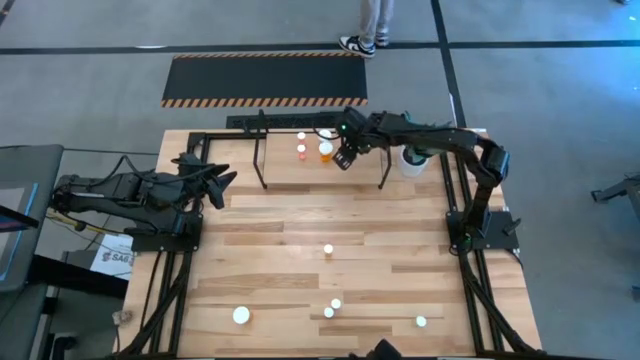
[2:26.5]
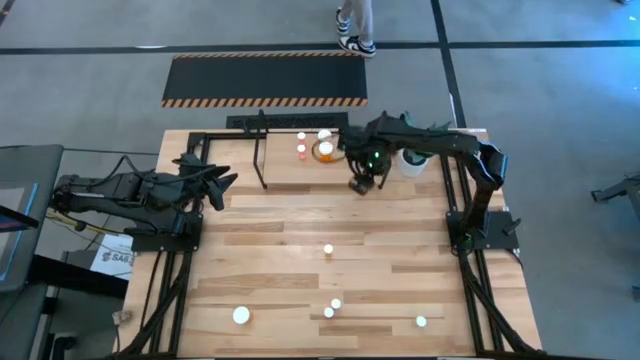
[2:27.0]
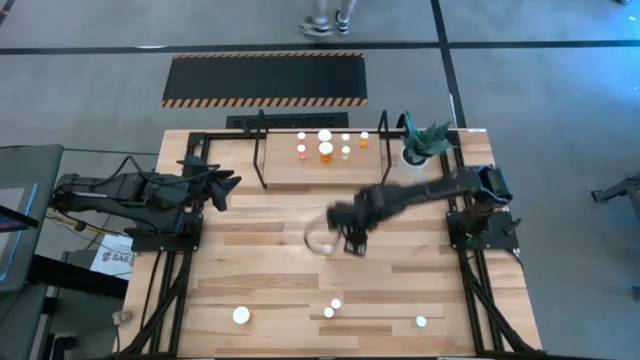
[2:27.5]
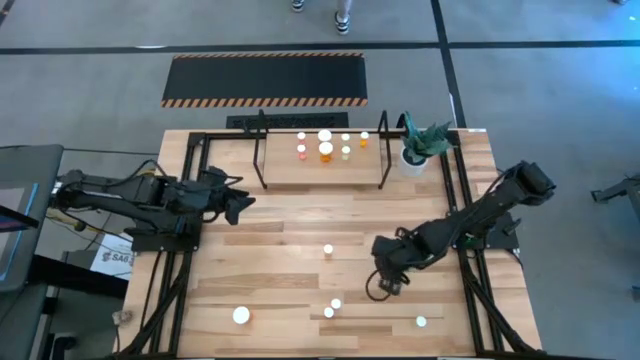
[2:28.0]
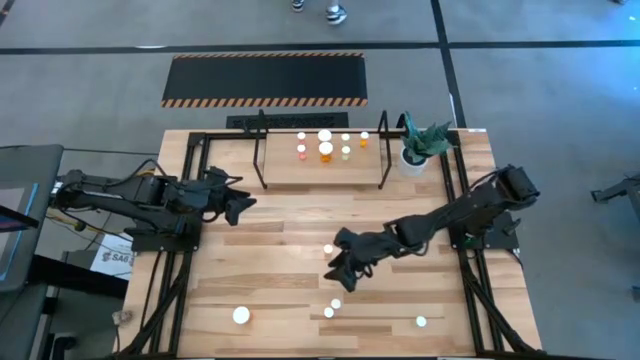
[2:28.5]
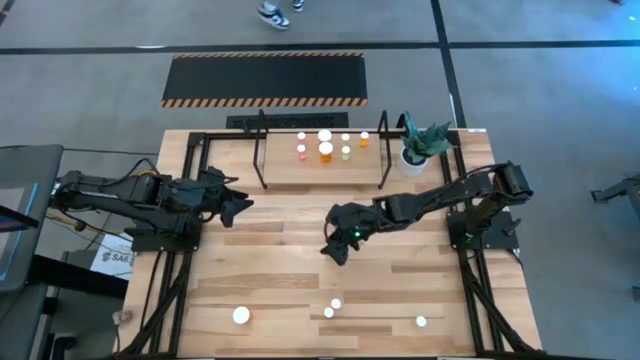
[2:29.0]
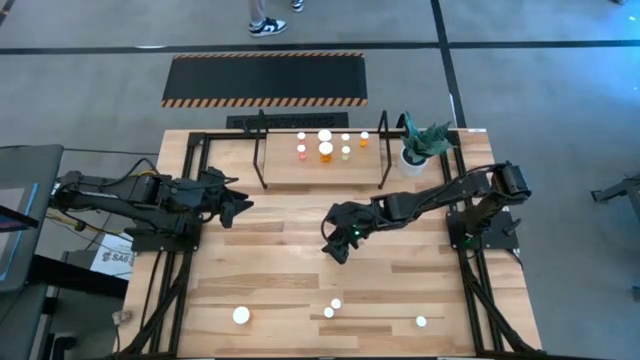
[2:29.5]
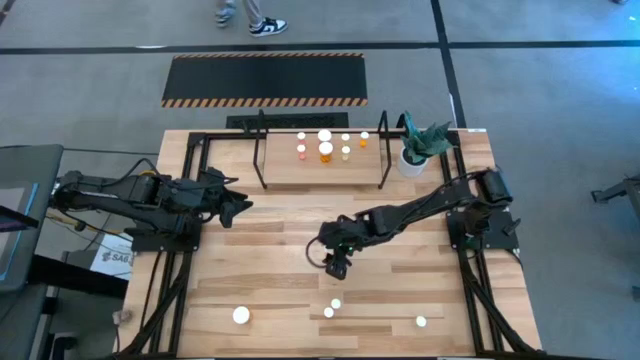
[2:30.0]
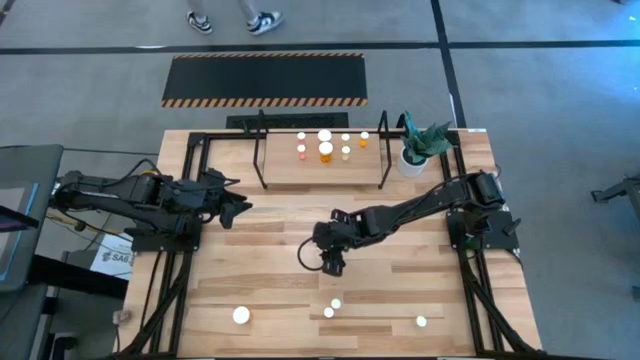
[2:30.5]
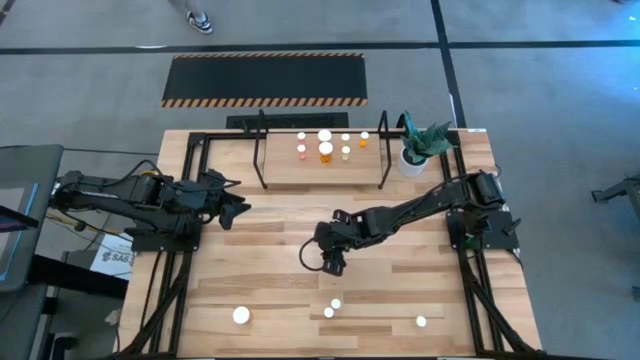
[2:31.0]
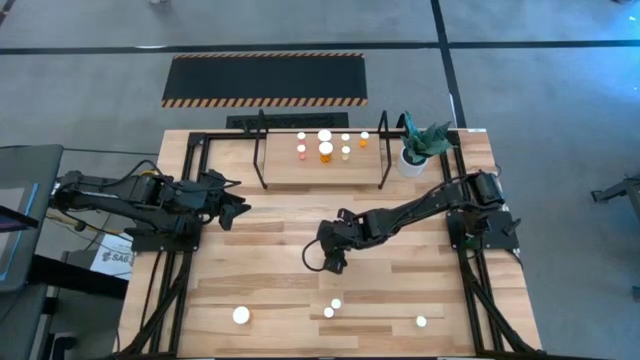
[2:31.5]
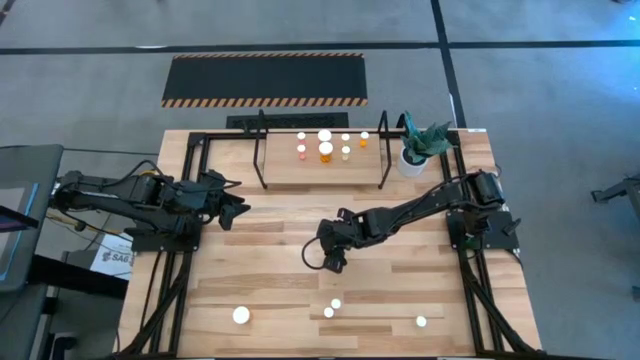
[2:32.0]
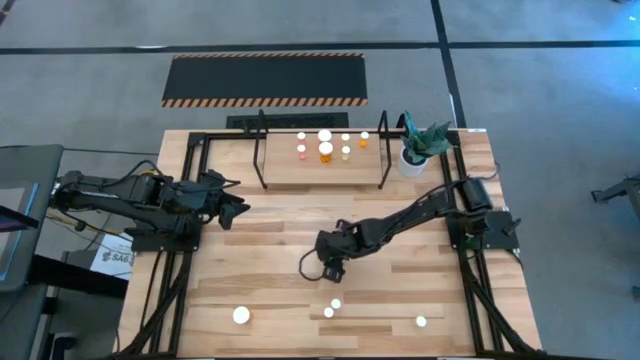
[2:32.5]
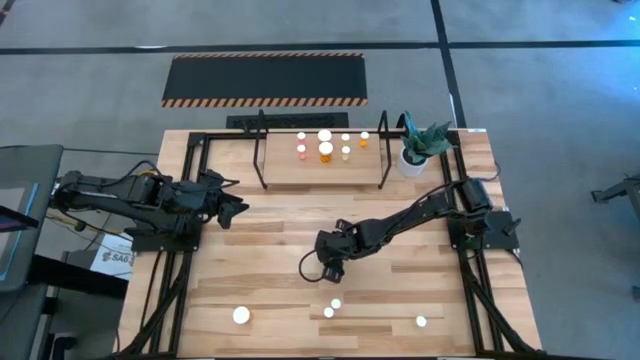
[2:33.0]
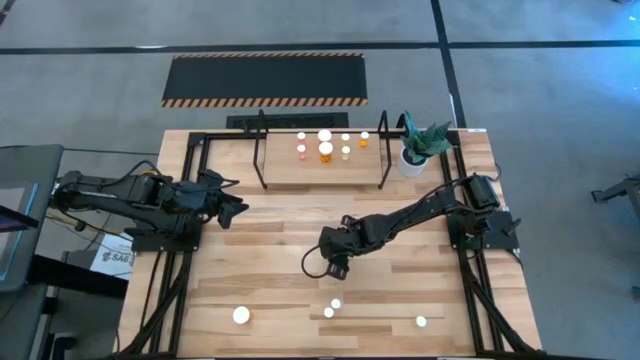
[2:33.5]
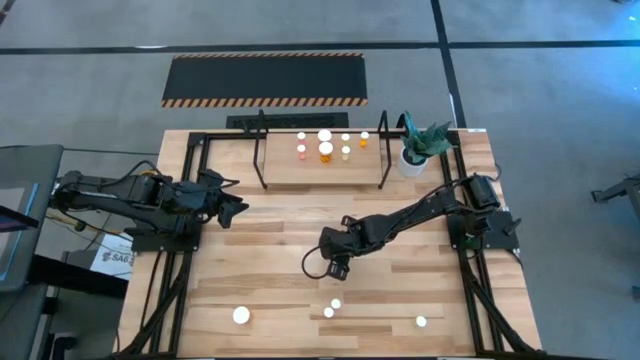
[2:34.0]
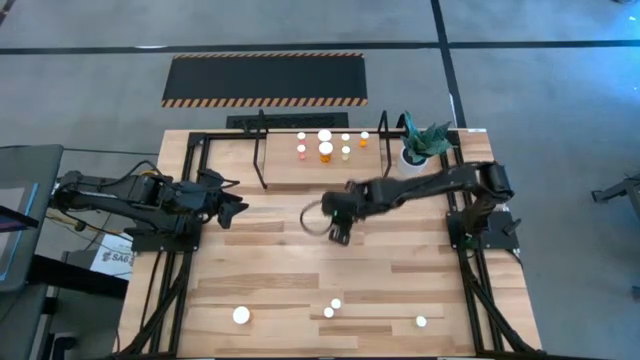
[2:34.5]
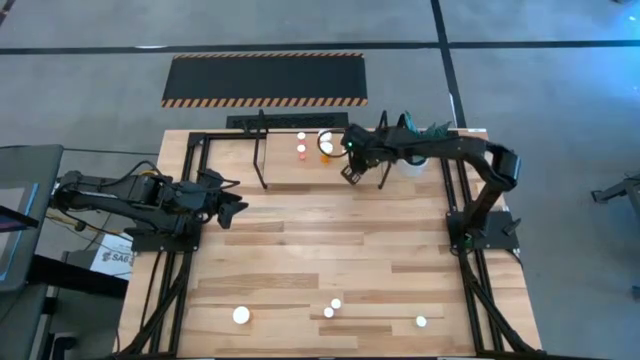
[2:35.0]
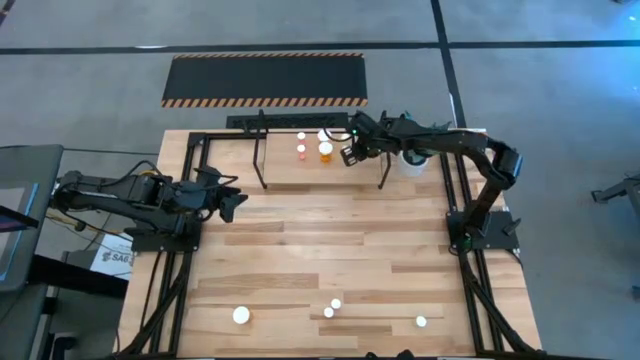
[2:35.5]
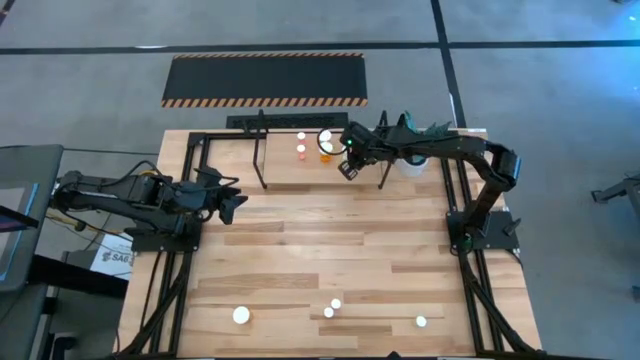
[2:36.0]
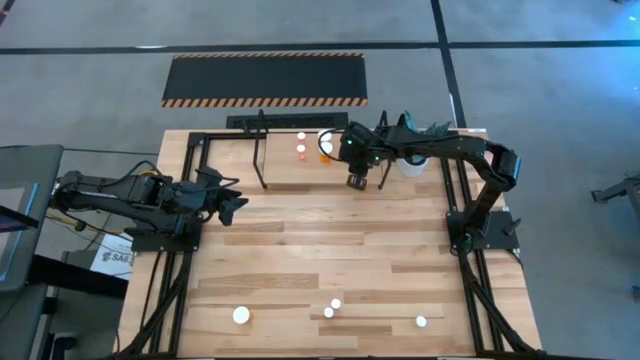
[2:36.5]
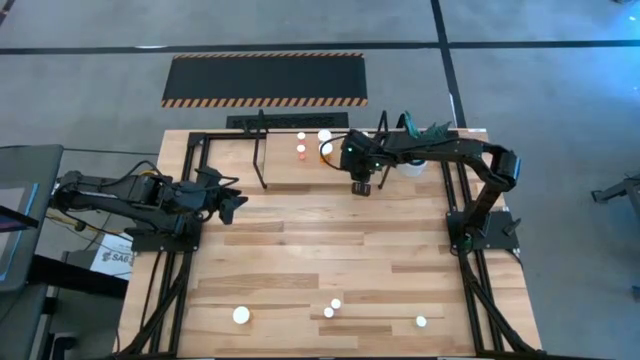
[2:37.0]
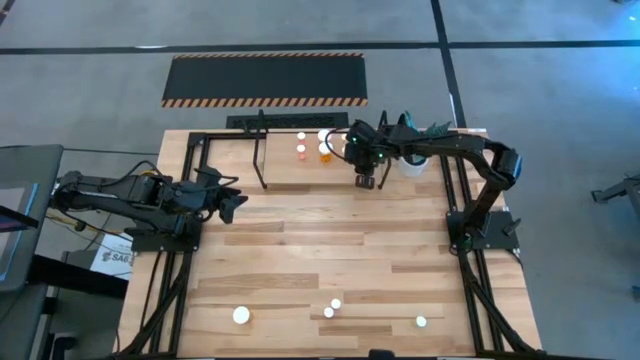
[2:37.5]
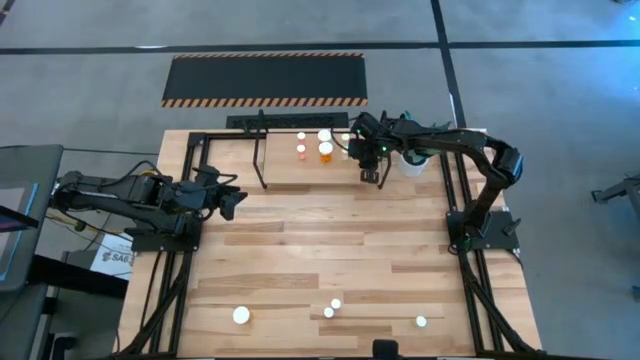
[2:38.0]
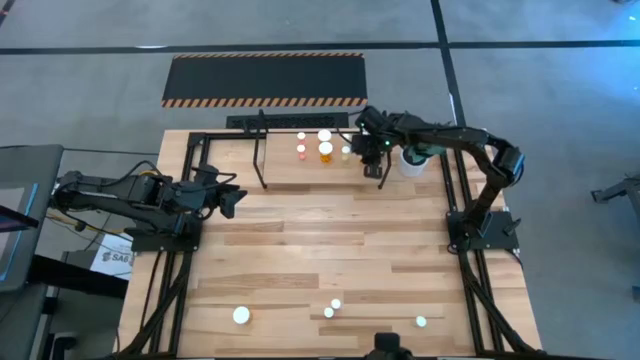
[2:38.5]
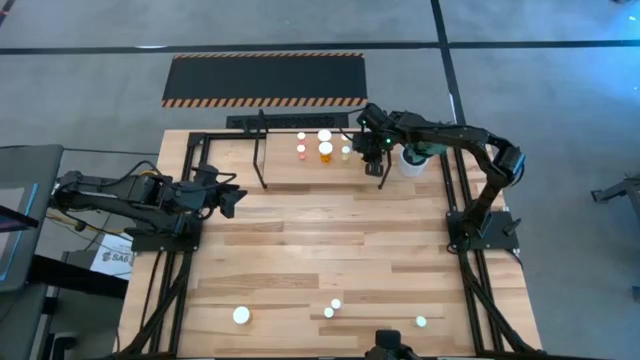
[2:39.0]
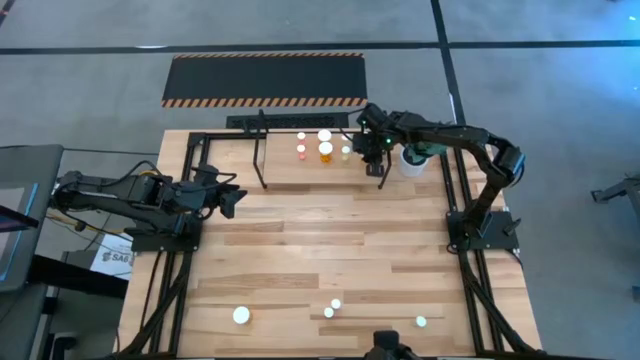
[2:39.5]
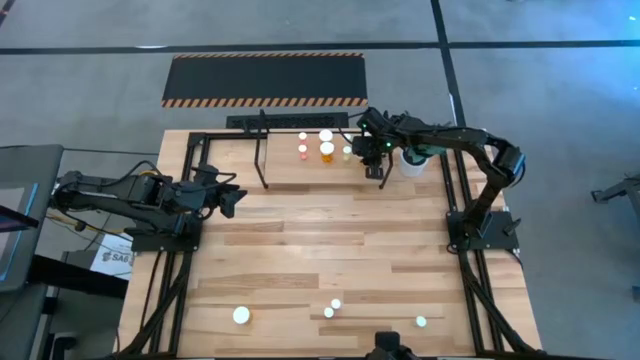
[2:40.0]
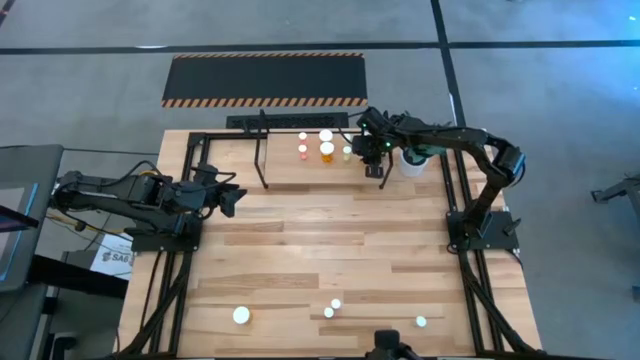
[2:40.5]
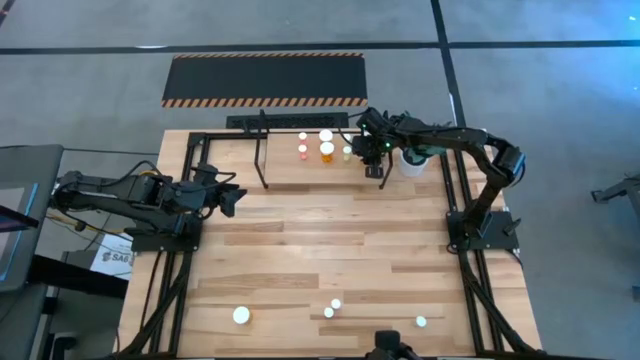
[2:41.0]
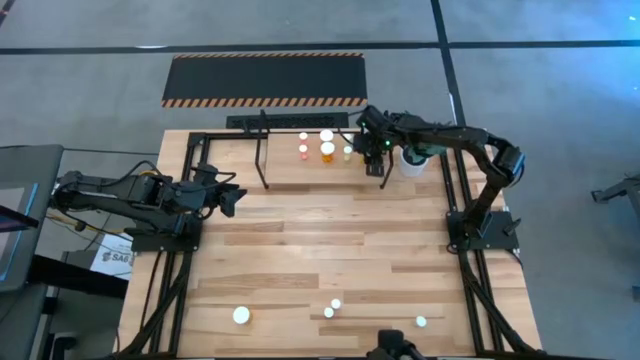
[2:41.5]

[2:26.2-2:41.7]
Task: Pick and place medicine bottles onto shelf by color
Put the top small orange pill bottle on the shelf aligned with the other small orange pill bottle

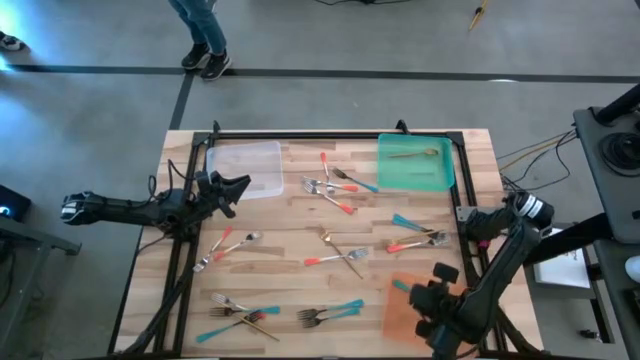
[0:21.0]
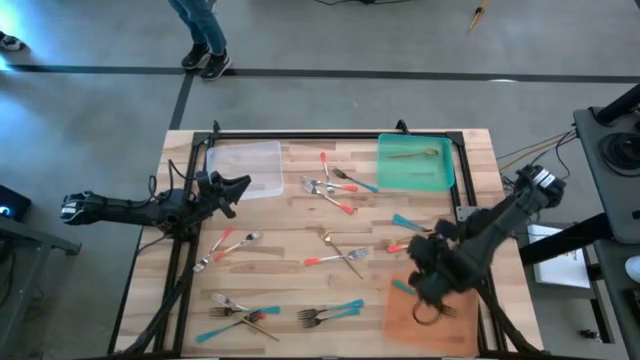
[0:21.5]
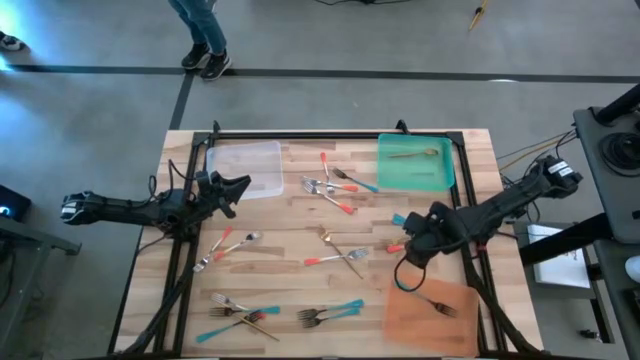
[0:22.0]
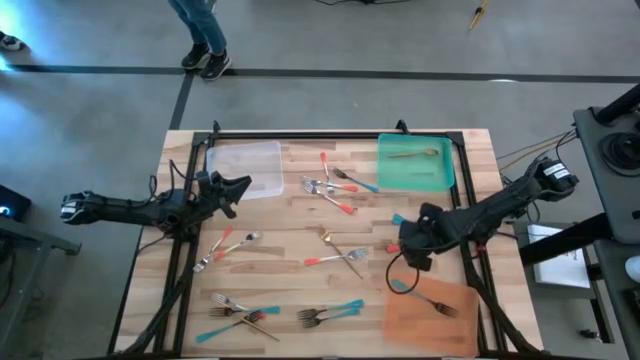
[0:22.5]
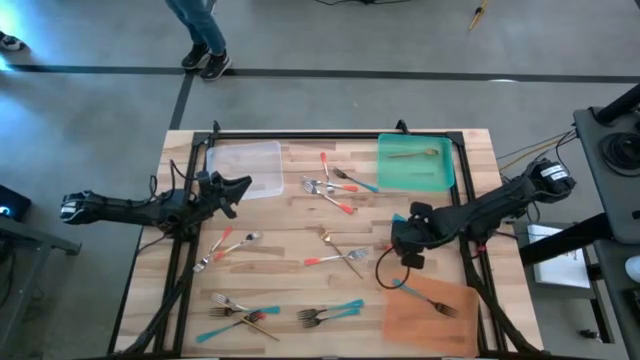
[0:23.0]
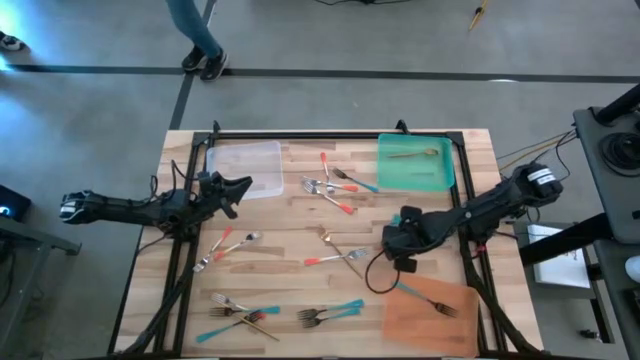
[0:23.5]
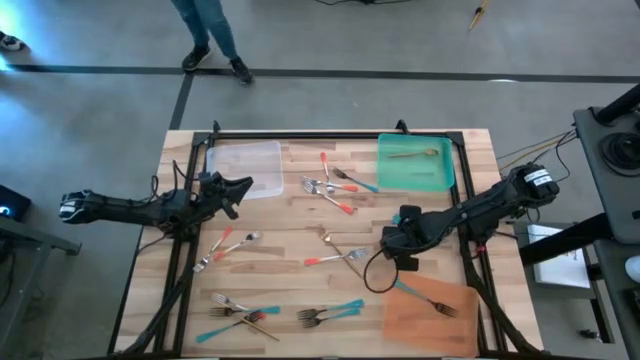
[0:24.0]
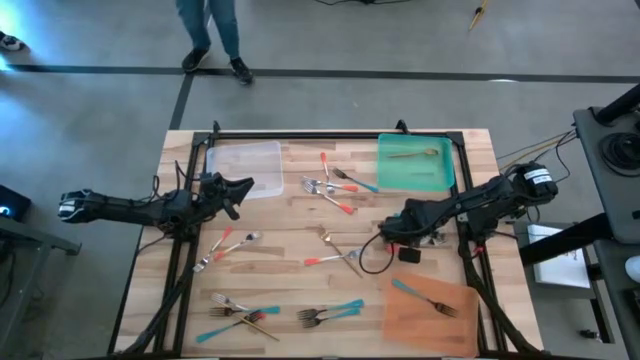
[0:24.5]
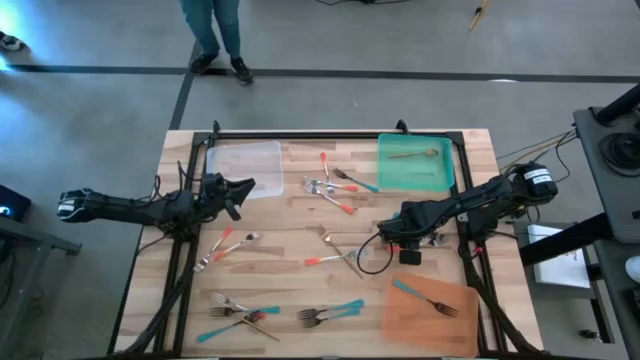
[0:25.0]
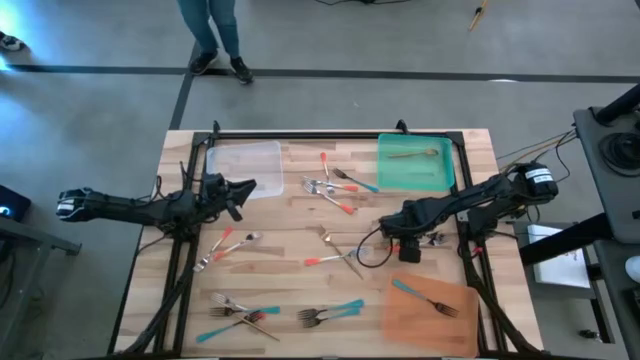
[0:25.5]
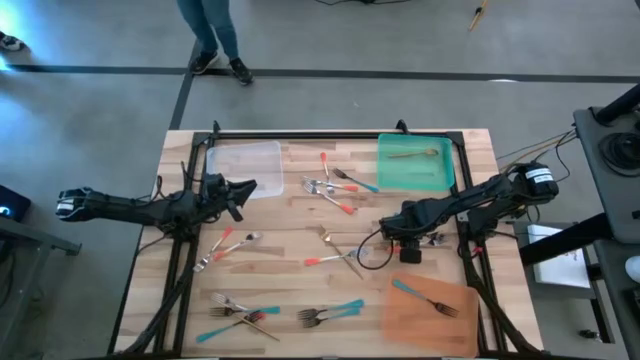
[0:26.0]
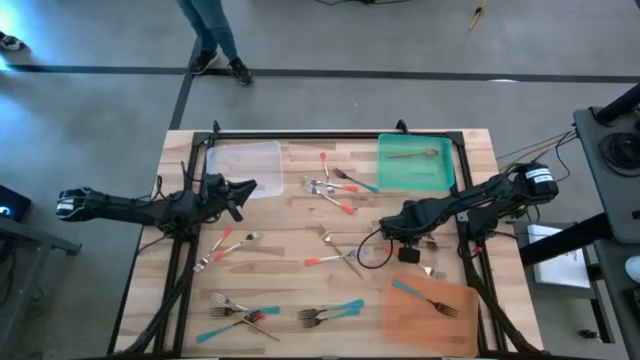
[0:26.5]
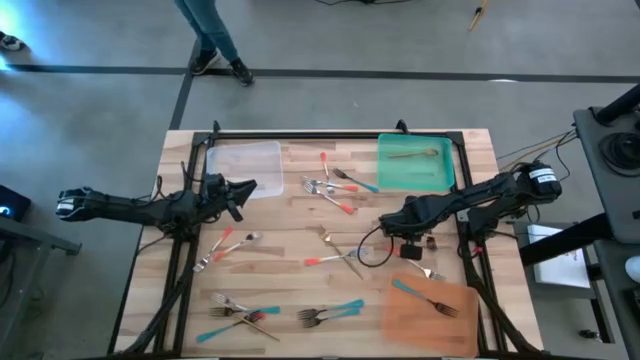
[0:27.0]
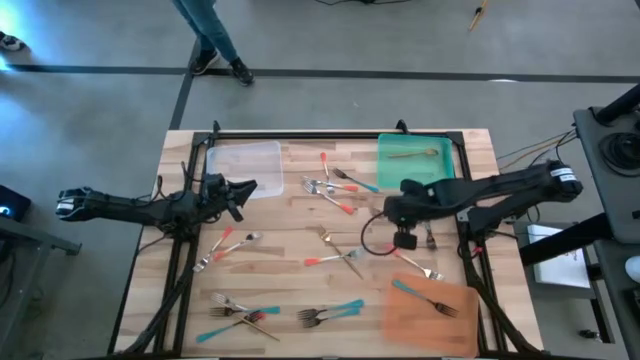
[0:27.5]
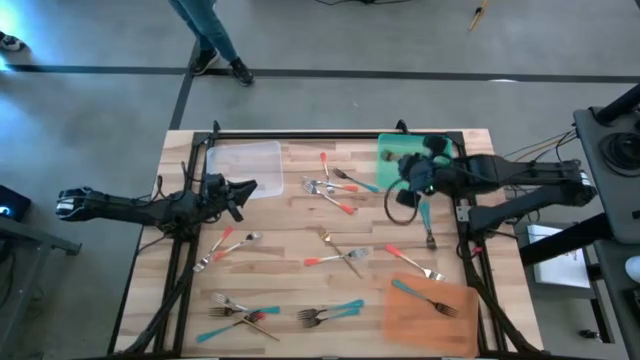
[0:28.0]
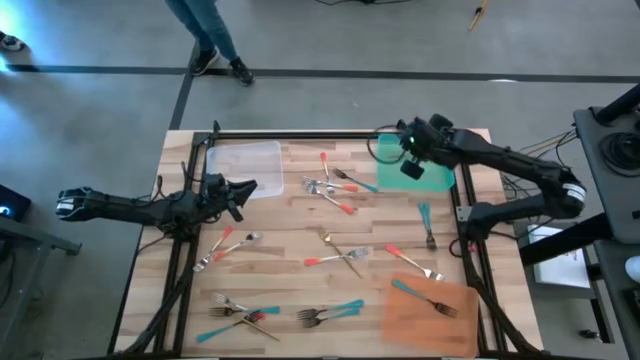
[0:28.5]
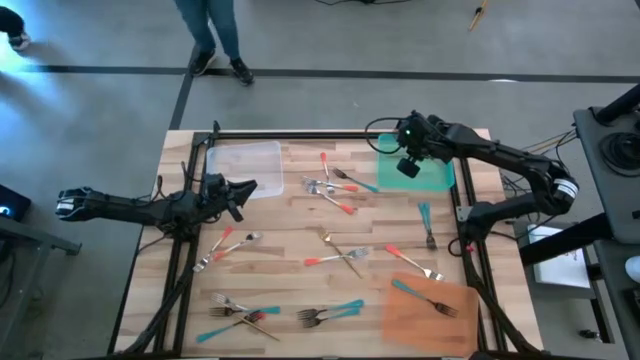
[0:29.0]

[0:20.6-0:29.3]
Task: Sort silverware by color (type)
Put the golden fork into the green bin
